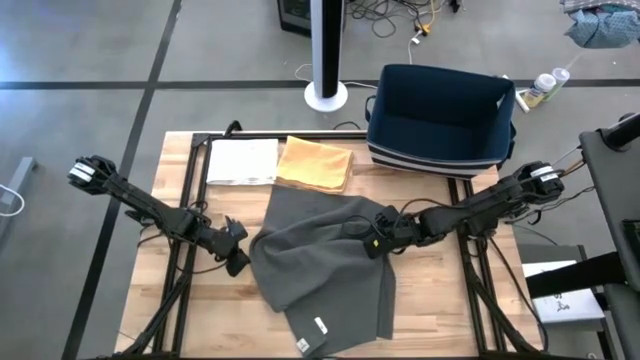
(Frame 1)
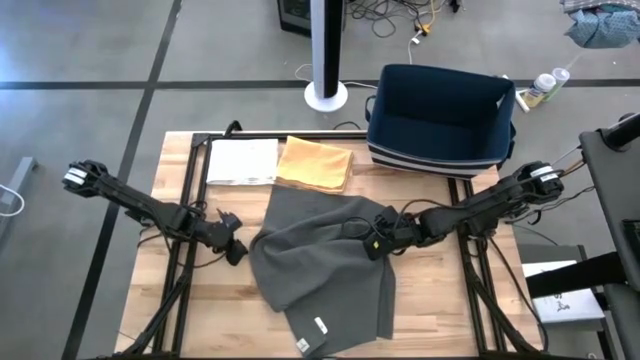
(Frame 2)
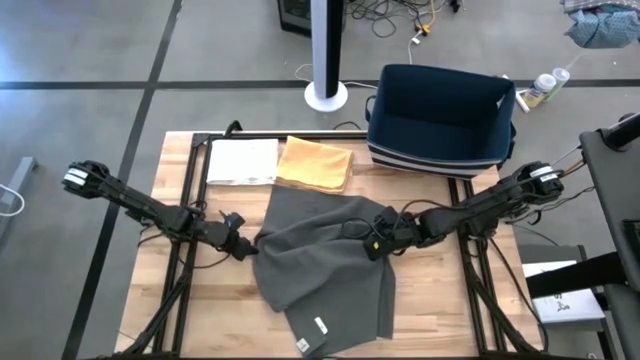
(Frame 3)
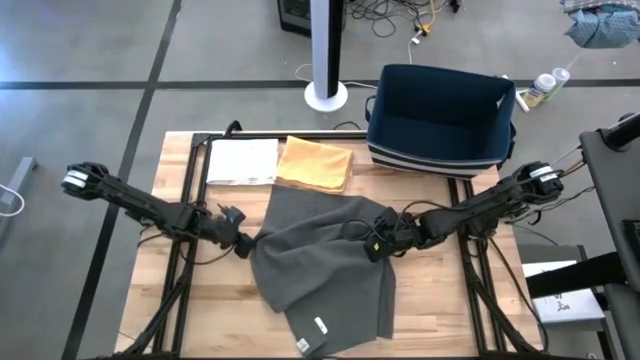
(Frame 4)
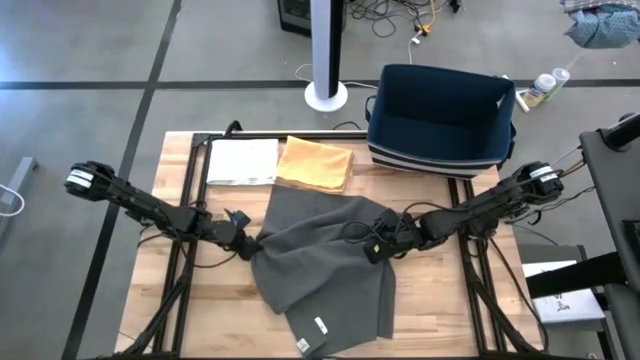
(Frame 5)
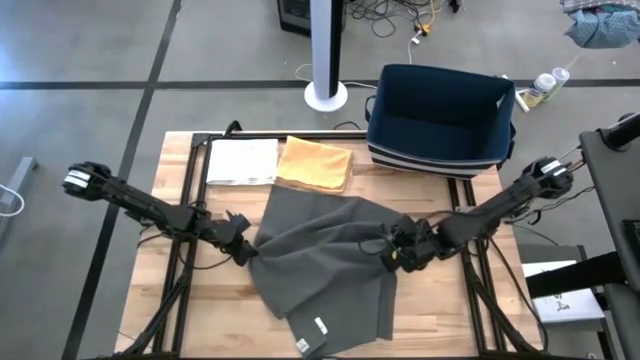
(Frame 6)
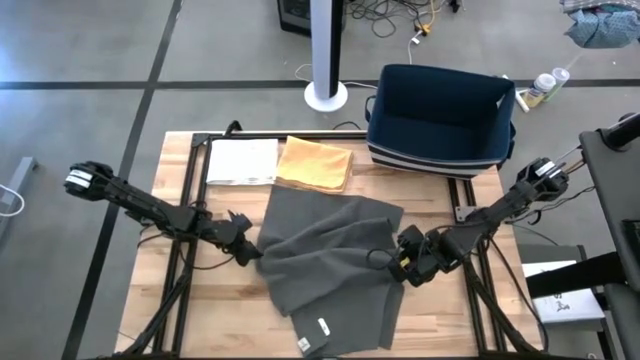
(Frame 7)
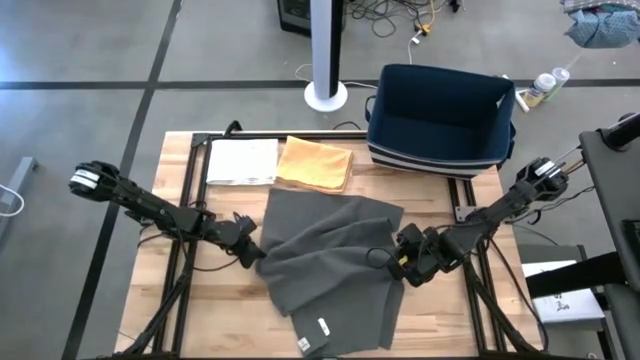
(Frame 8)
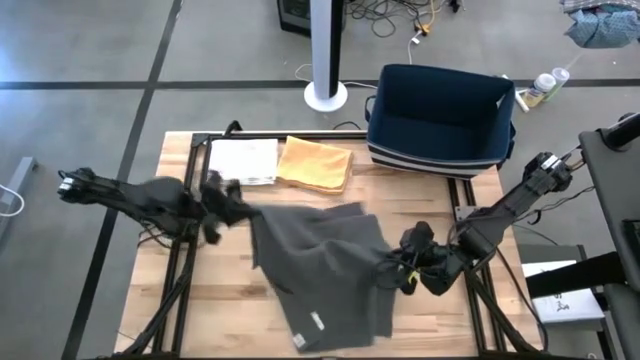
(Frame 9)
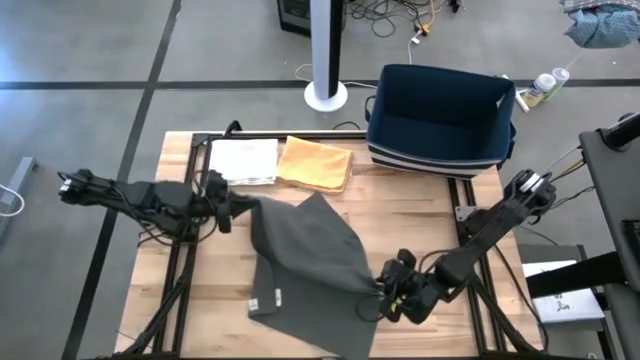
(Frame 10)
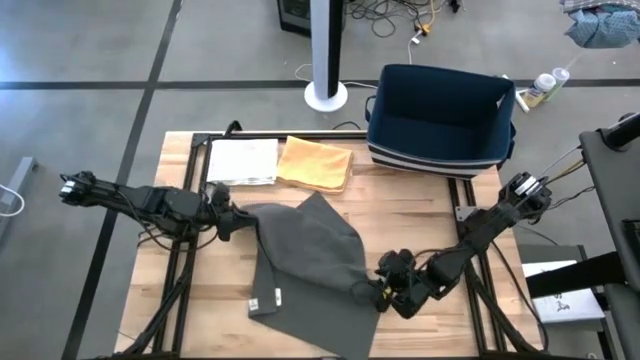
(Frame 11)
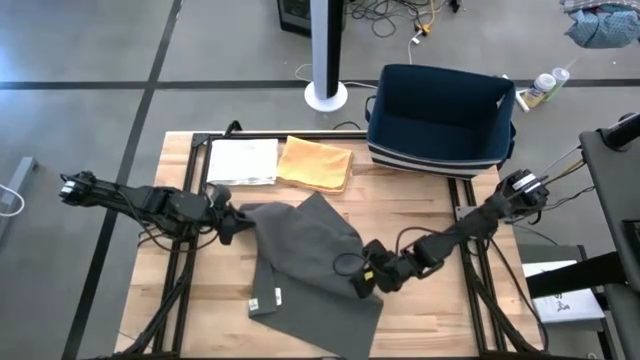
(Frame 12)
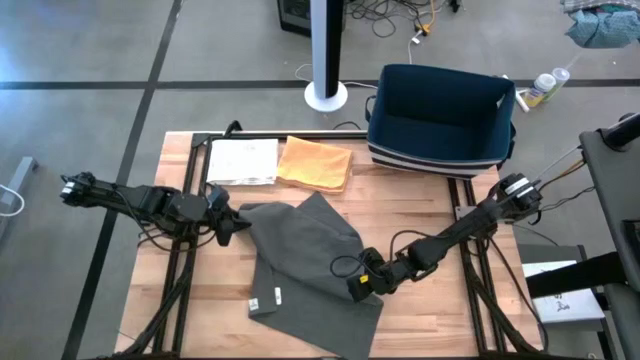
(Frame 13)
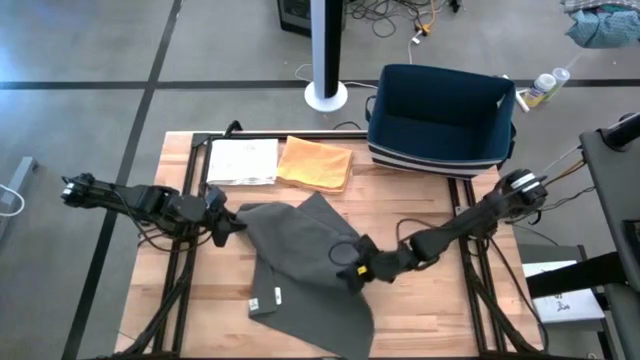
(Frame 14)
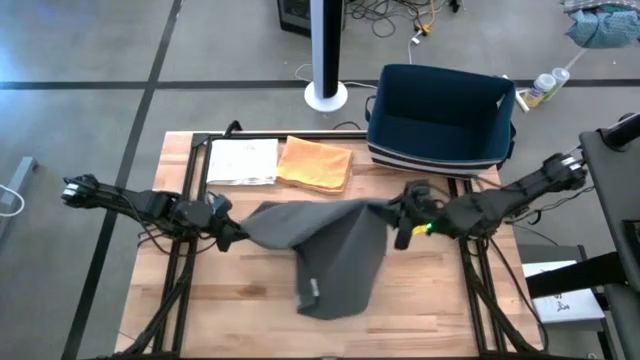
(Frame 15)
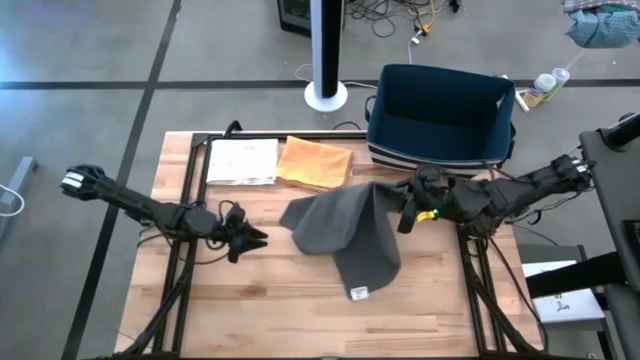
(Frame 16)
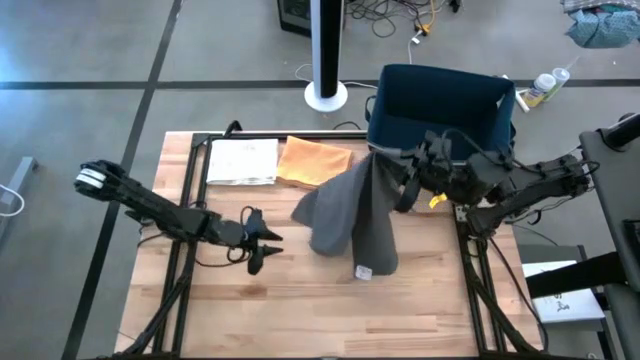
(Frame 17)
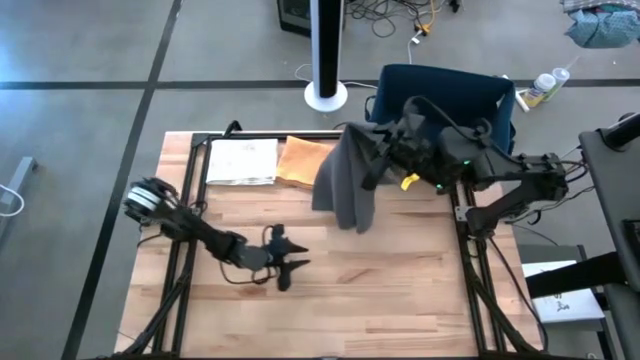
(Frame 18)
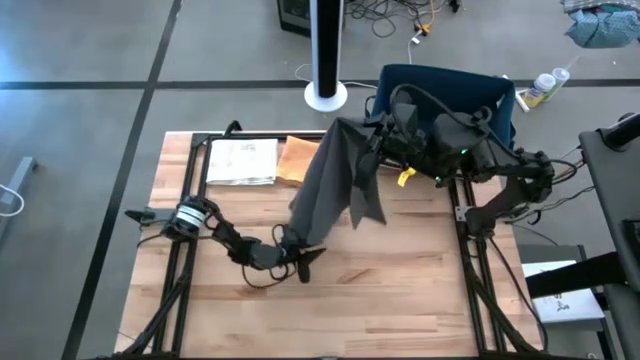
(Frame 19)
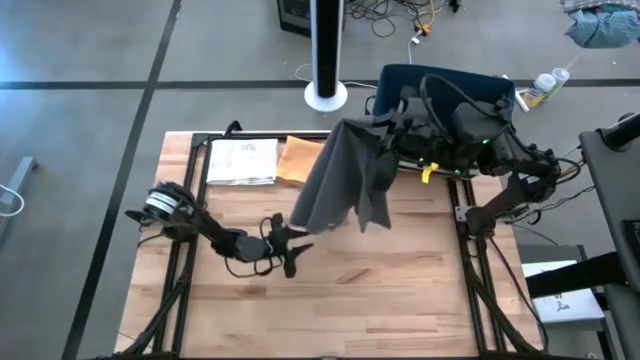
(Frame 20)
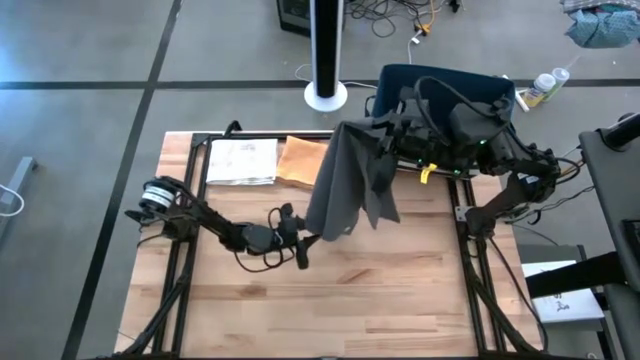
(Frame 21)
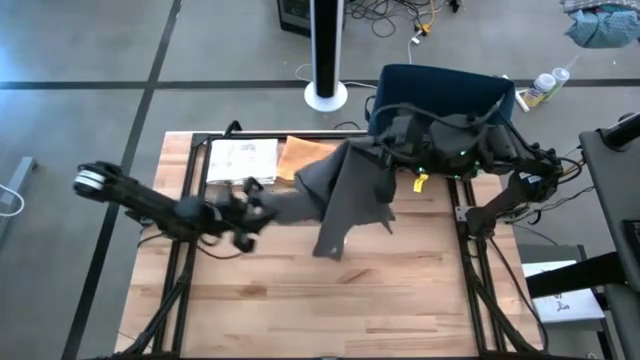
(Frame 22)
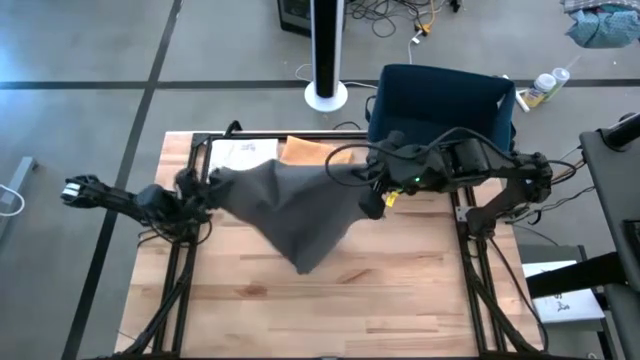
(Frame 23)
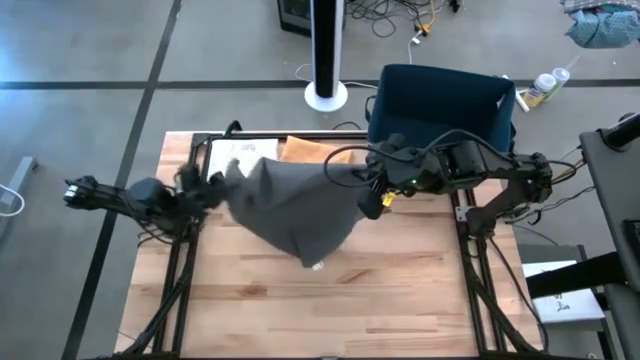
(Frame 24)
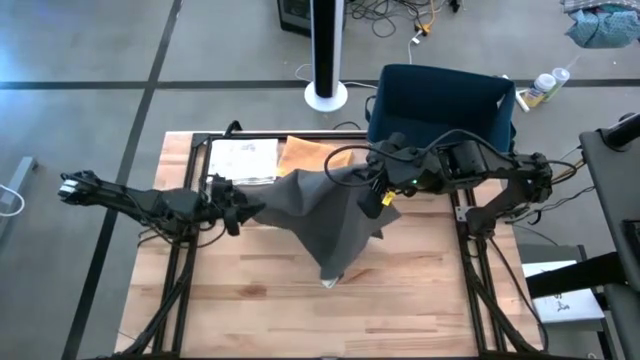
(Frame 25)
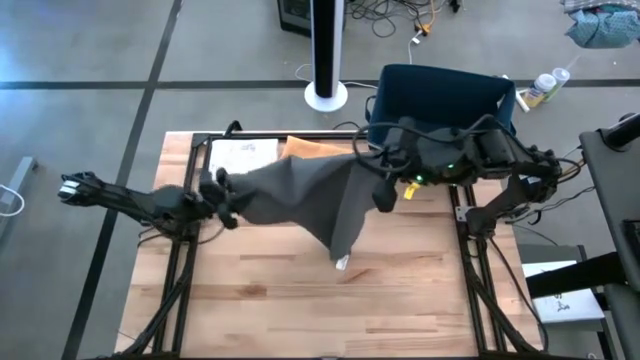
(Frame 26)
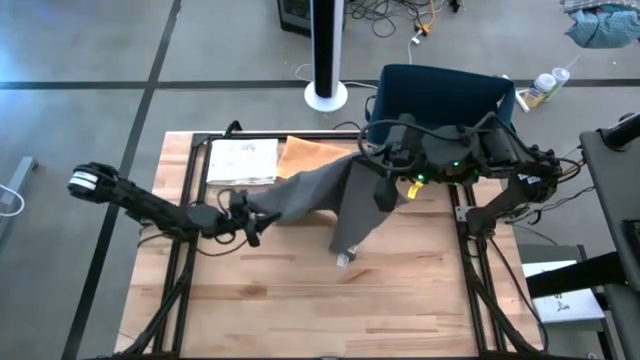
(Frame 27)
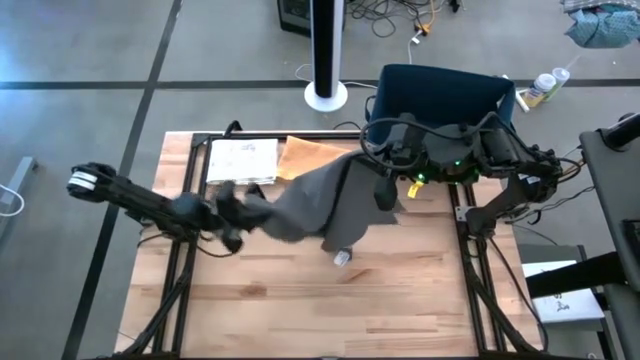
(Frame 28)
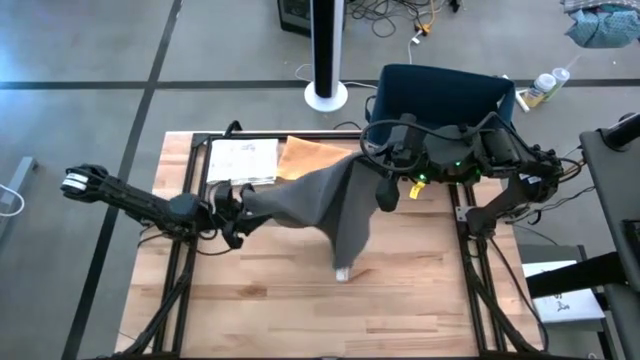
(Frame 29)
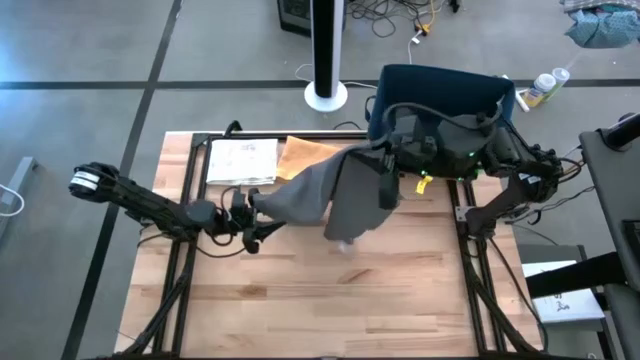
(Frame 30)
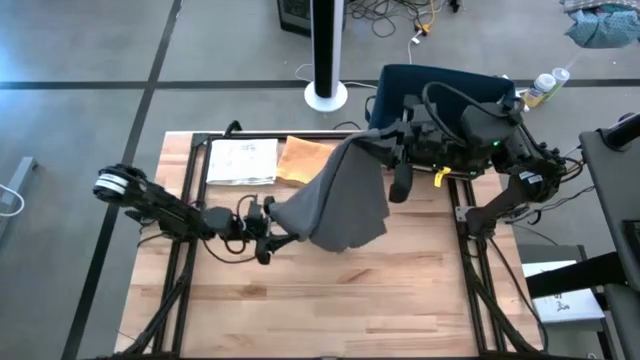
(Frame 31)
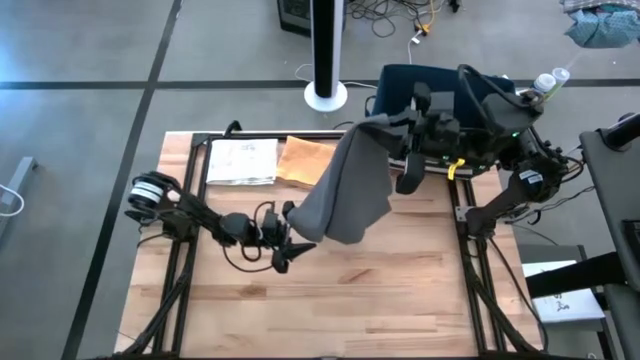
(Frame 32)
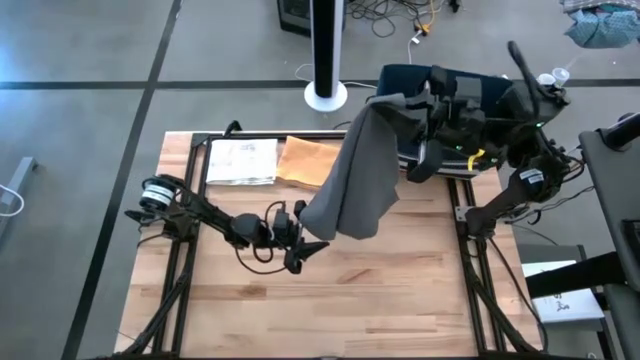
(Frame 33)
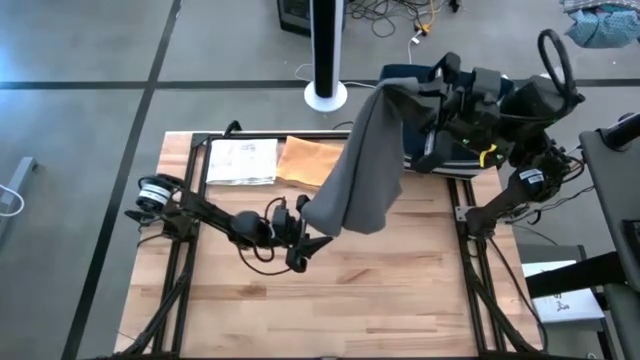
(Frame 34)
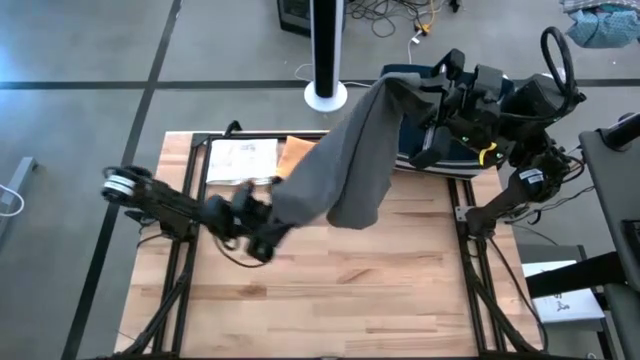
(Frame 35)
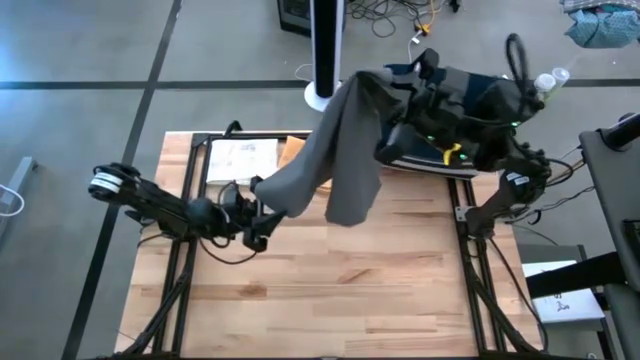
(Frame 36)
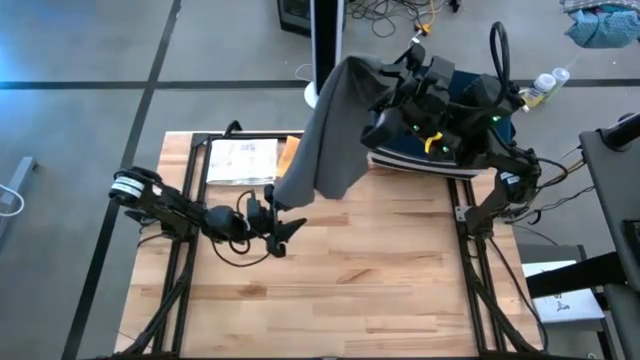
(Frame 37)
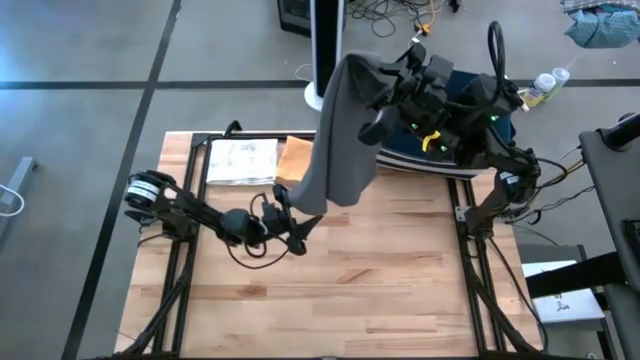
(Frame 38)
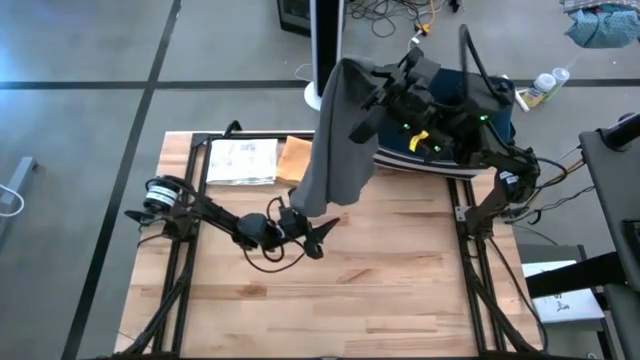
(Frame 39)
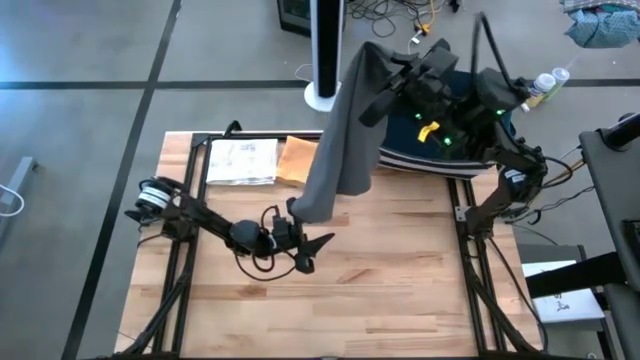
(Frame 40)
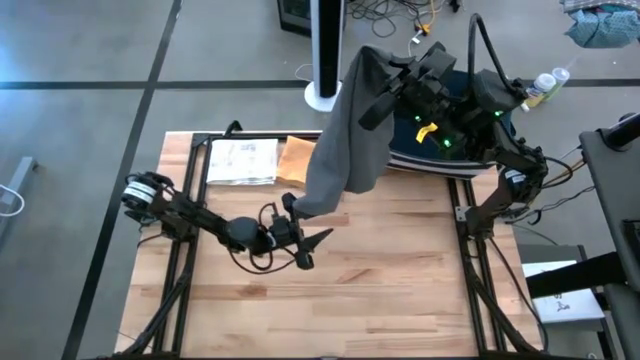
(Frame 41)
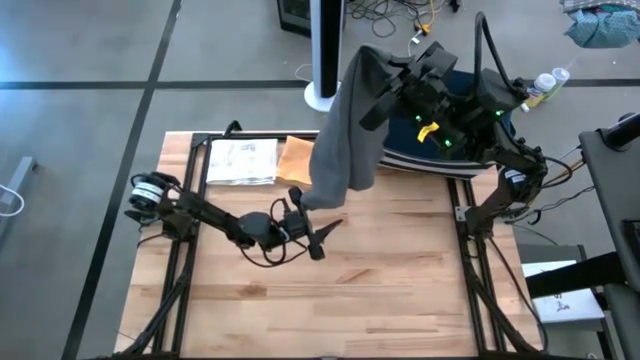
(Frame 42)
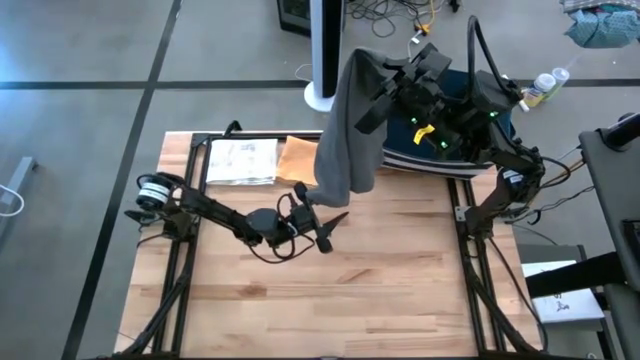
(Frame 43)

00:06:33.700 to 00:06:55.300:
Task: Fold towel
Fold the black towel
